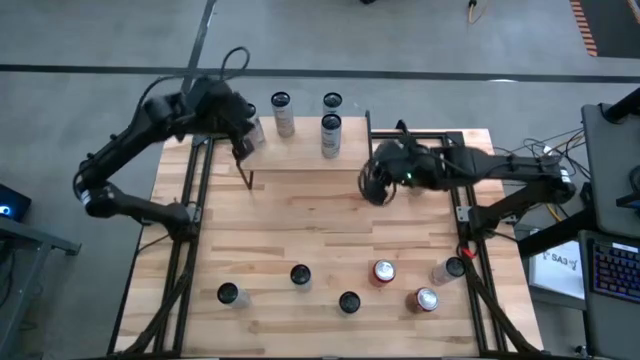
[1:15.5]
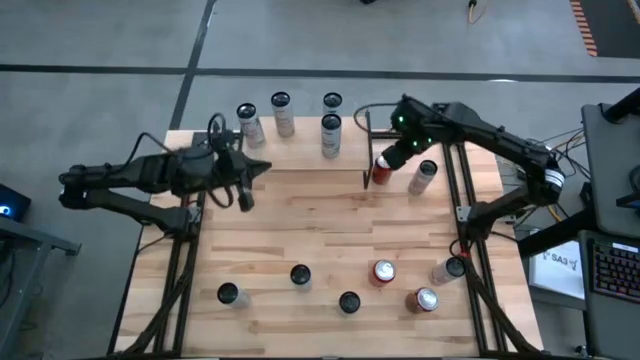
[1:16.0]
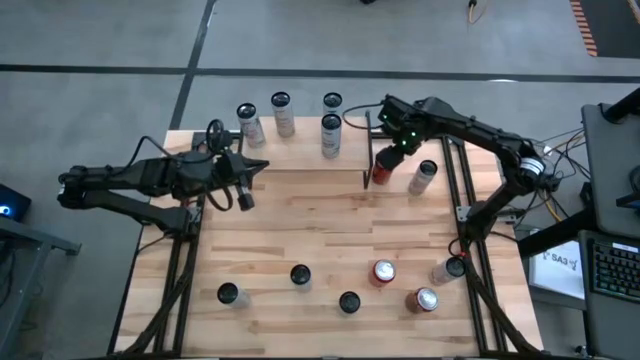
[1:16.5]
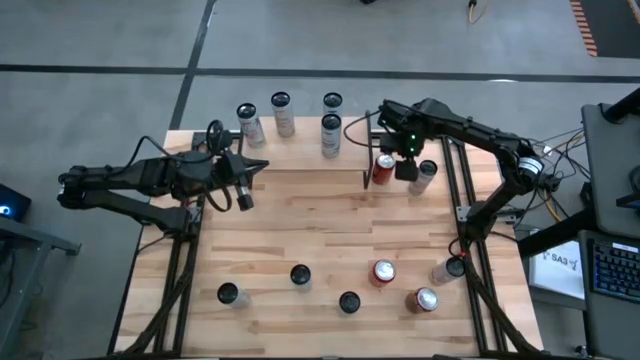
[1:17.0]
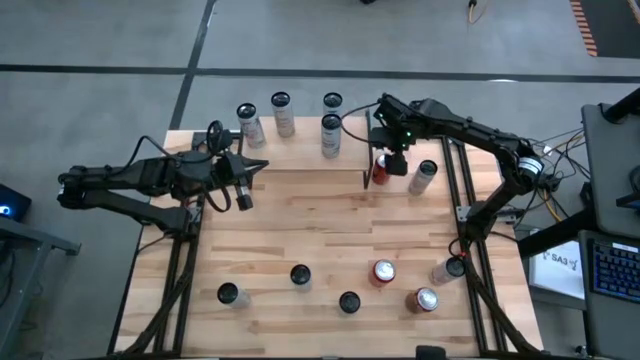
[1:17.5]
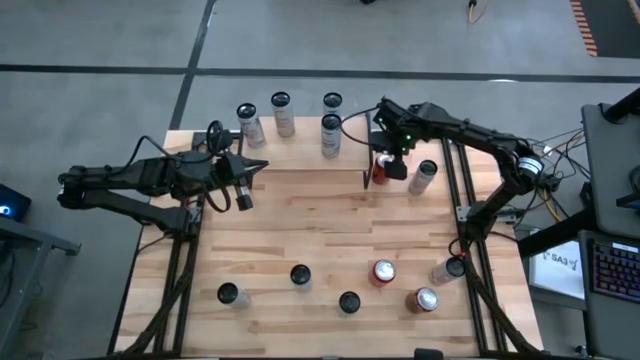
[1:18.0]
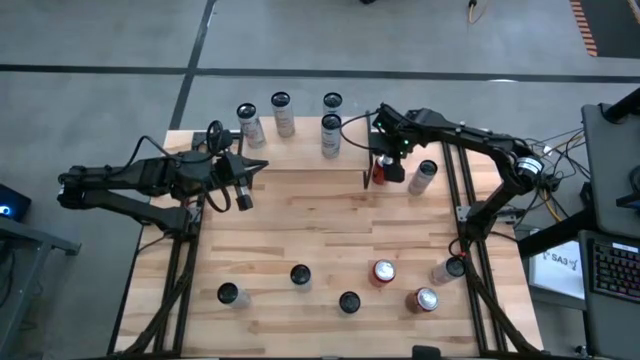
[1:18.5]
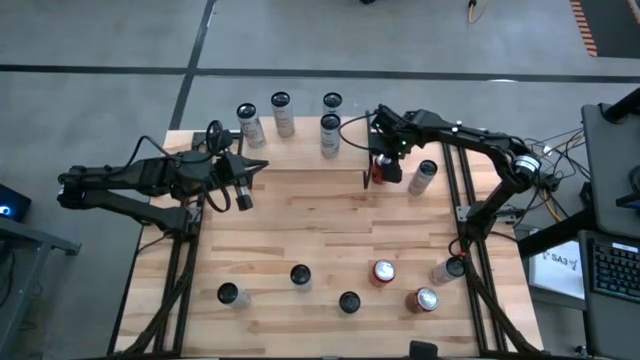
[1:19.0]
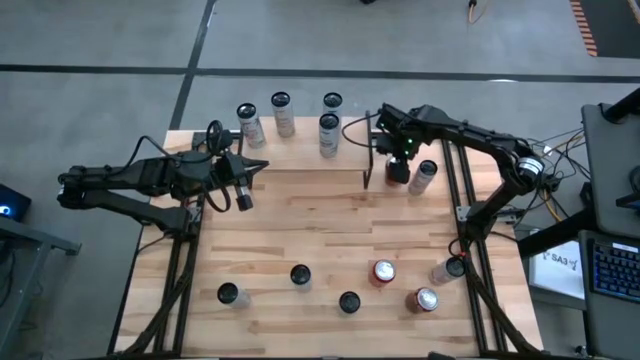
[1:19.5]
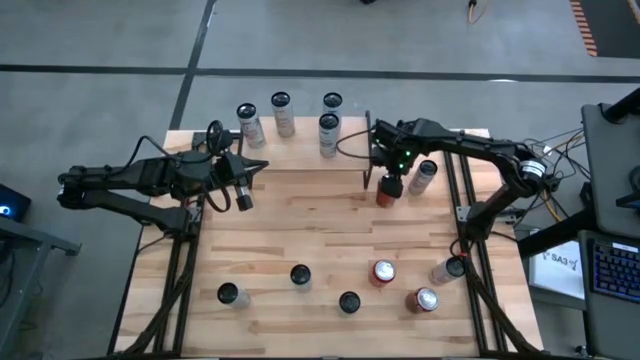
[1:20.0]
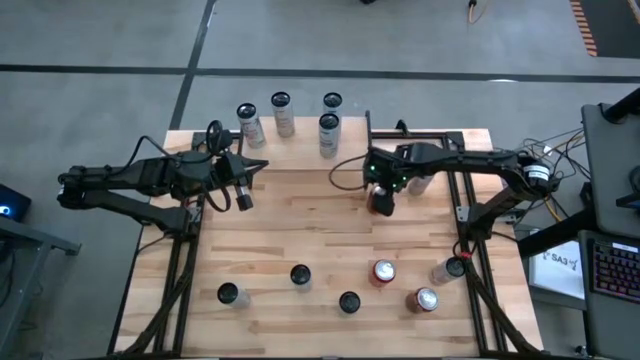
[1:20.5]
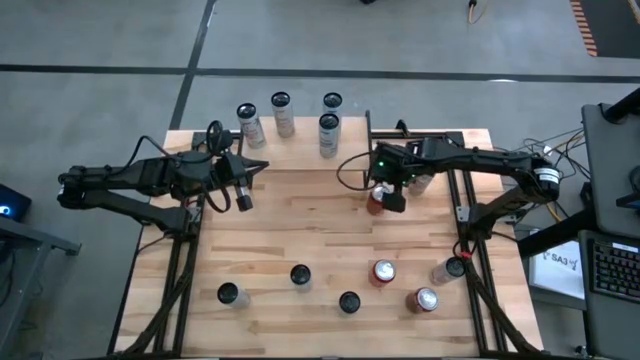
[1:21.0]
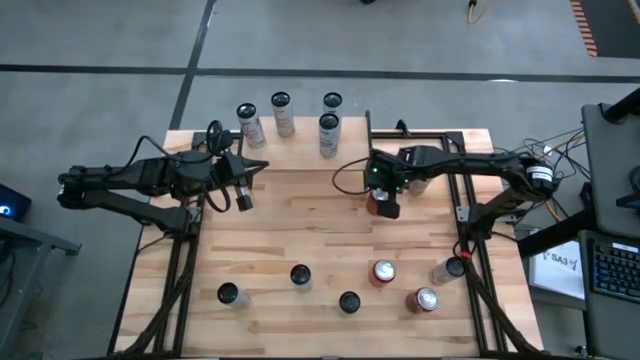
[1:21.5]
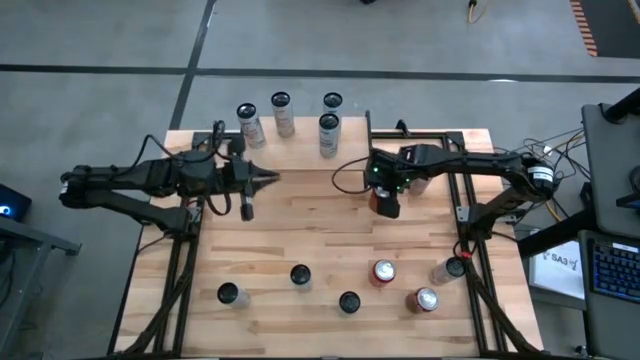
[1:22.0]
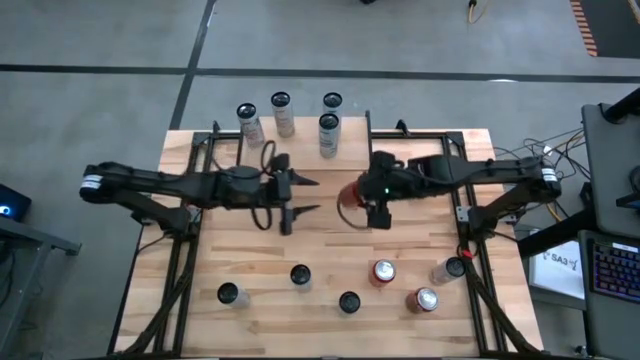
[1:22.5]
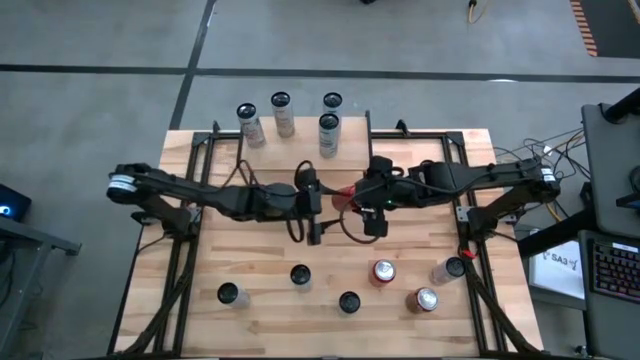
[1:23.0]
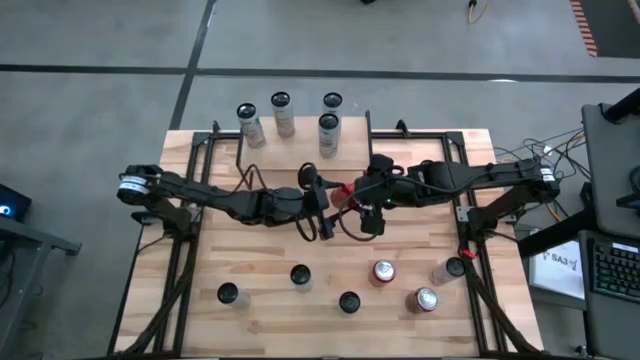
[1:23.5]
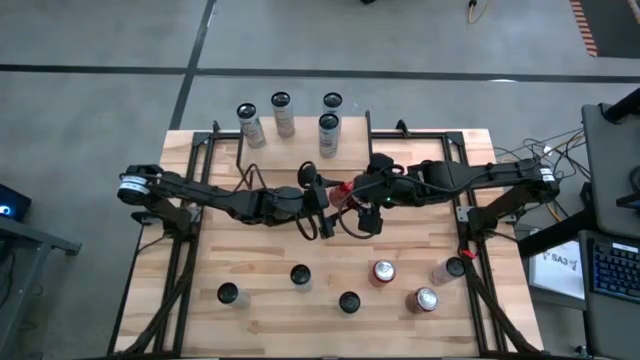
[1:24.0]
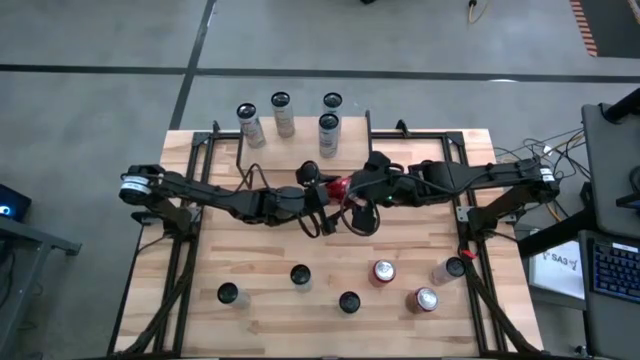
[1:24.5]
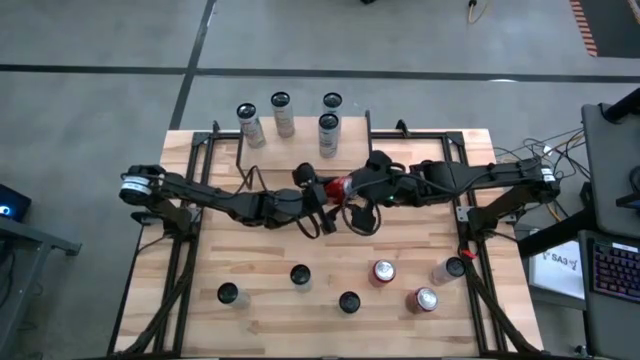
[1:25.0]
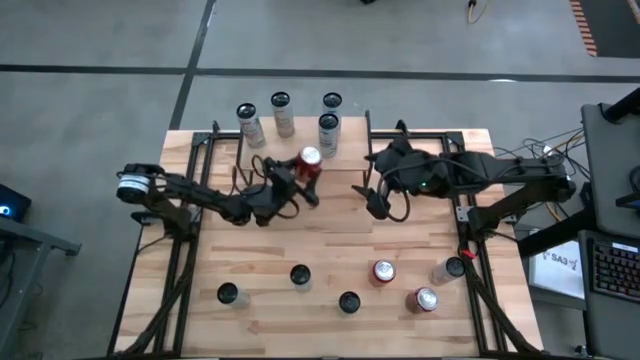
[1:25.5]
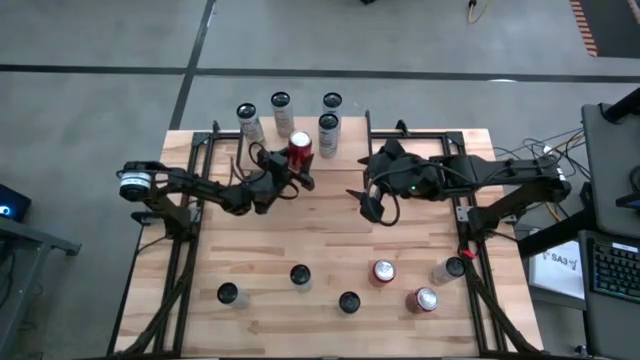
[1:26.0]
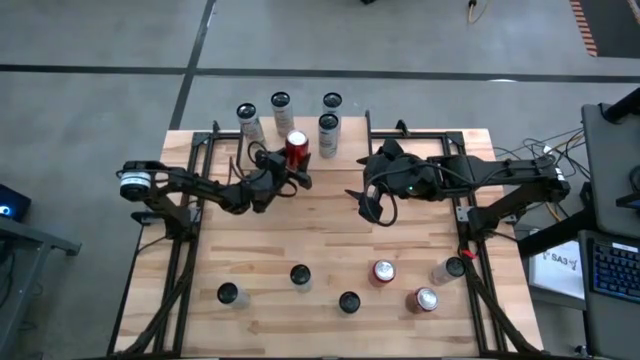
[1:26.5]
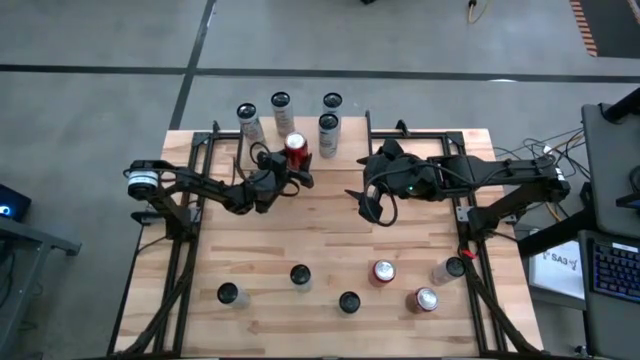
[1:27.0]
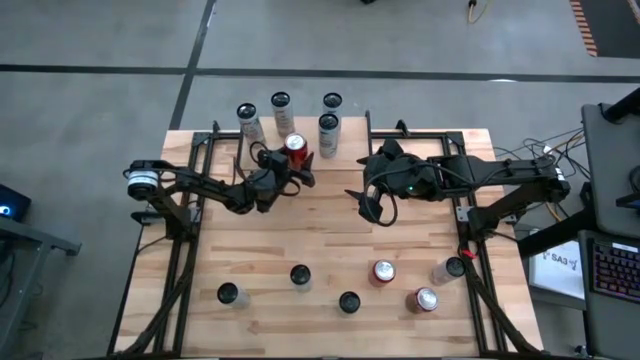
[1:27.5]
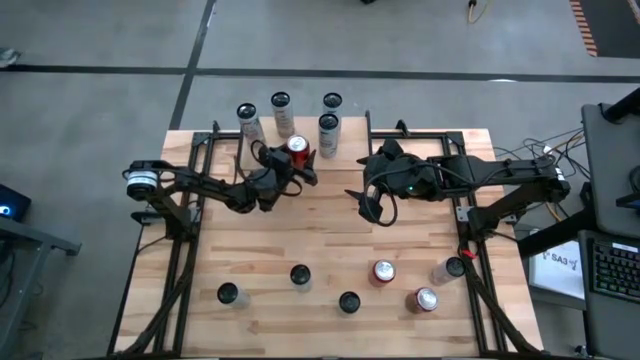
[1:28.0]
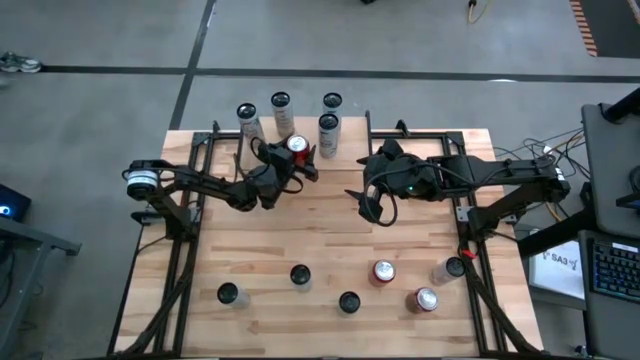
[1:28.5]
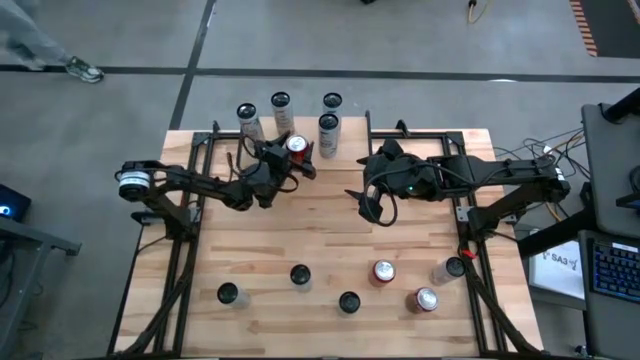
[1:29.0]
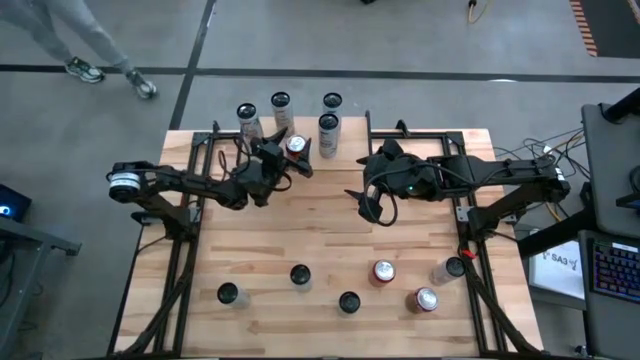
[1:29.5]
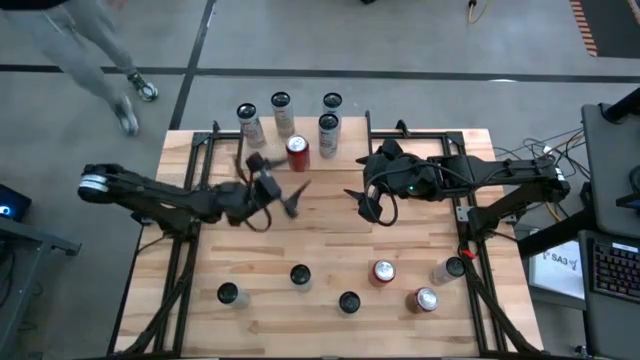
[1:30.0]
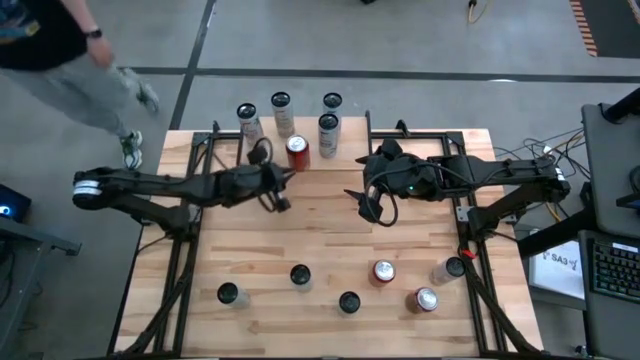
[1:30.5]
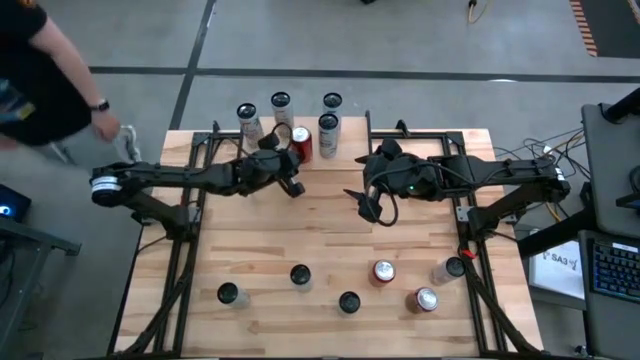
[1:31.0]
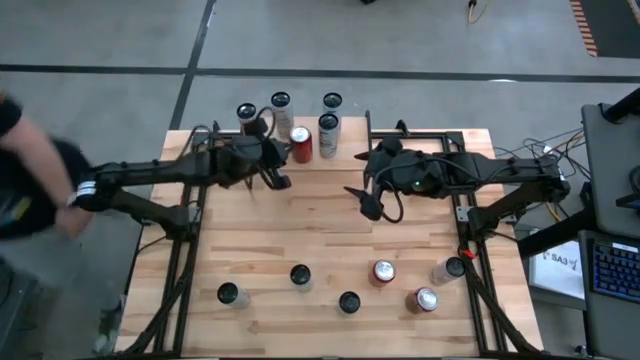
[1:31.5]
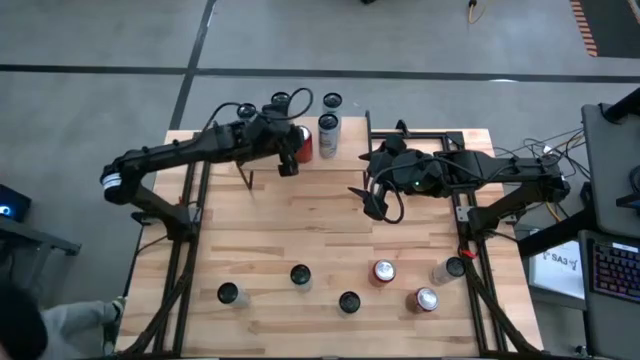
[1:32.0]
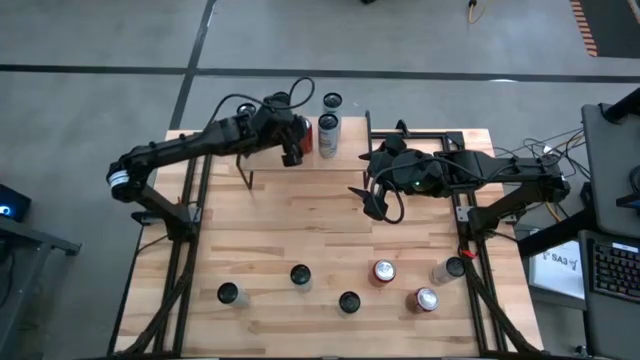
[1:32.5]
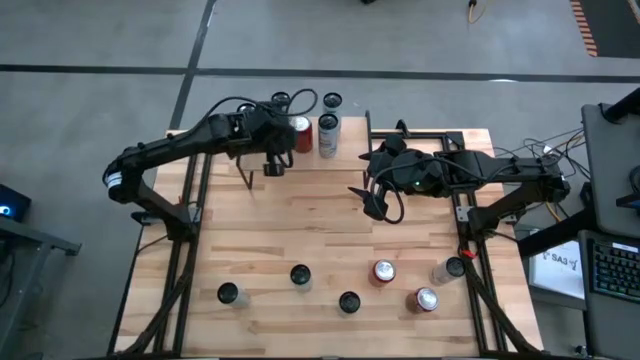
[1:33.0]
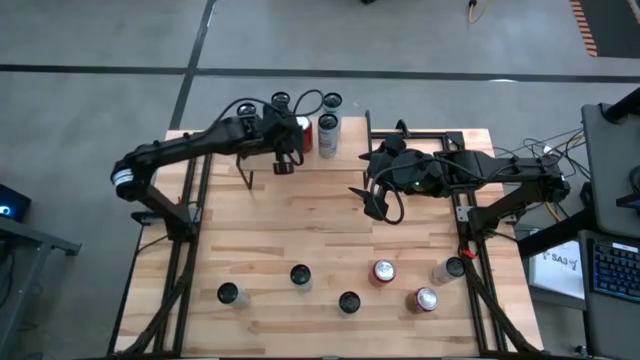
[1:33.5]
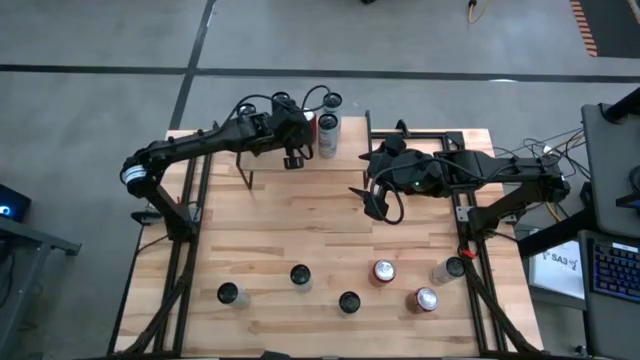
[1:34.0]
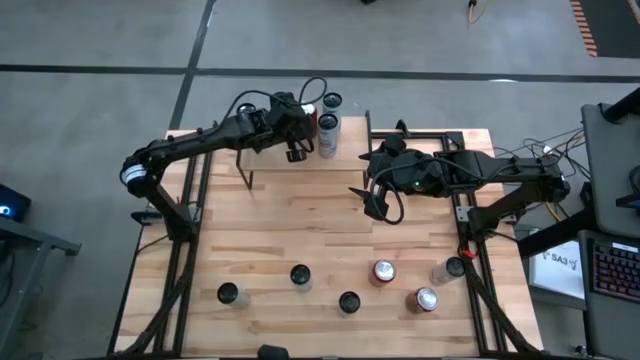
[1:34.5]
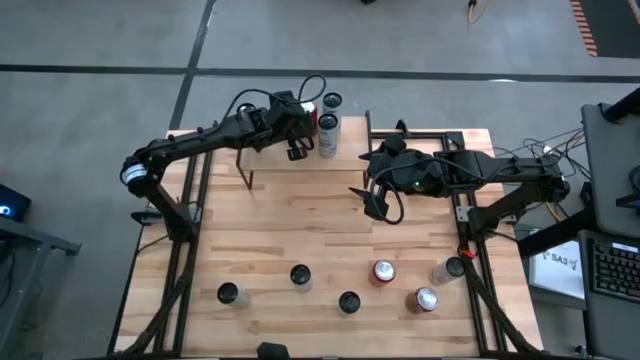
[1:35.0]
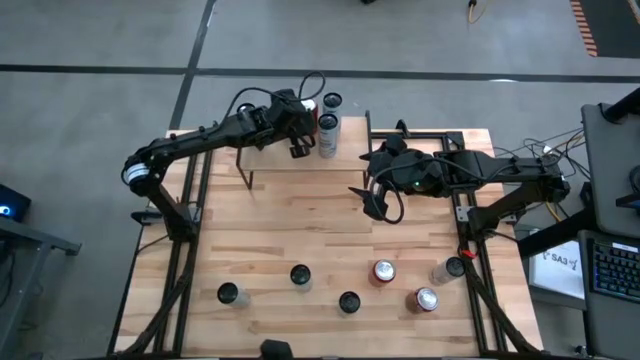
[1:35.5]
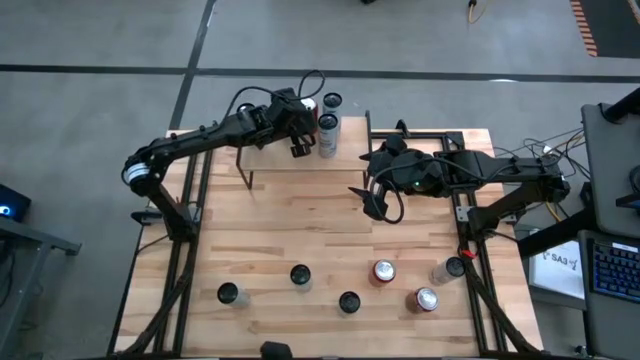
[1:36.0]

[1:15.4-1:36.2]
Task: Place canned beverage on shelf
Put the red soda can on the shelf
